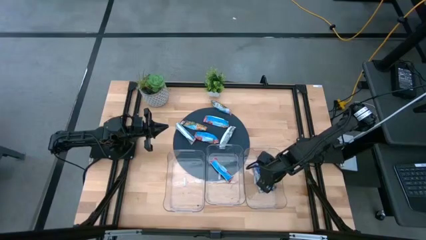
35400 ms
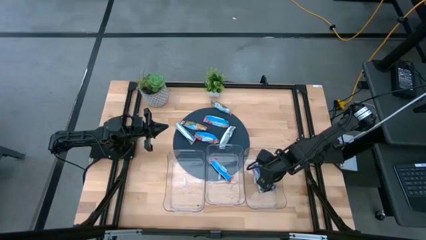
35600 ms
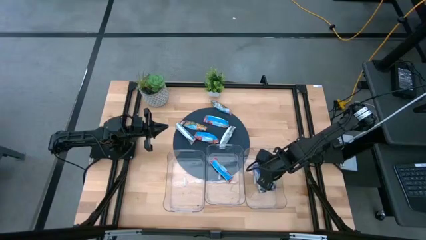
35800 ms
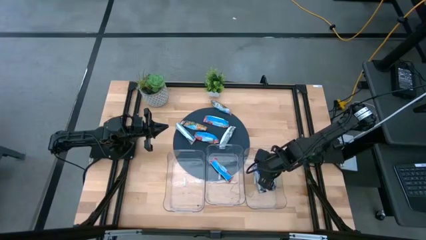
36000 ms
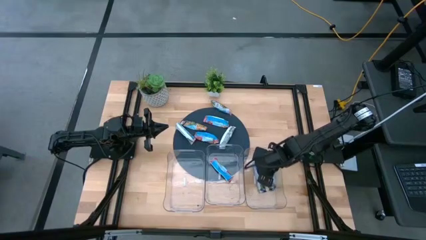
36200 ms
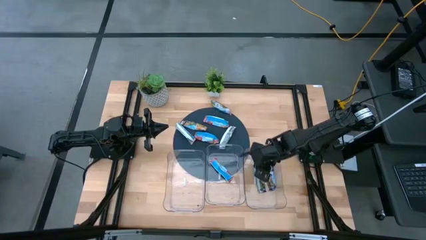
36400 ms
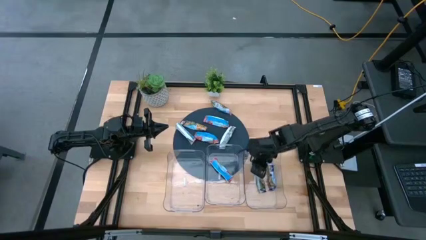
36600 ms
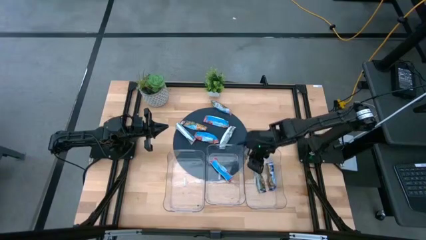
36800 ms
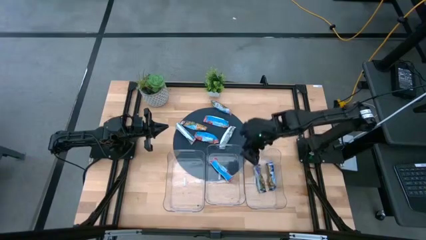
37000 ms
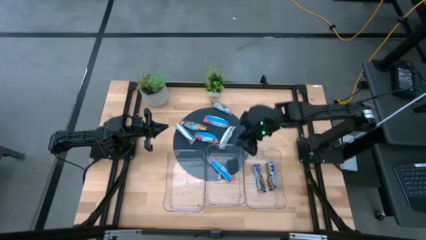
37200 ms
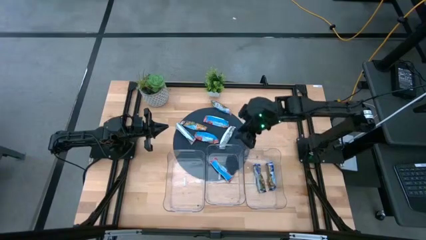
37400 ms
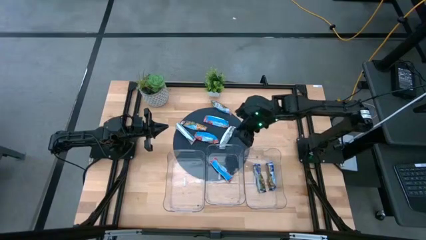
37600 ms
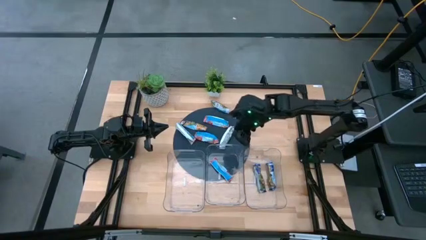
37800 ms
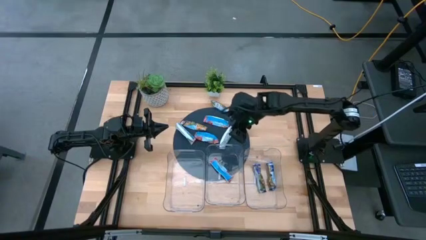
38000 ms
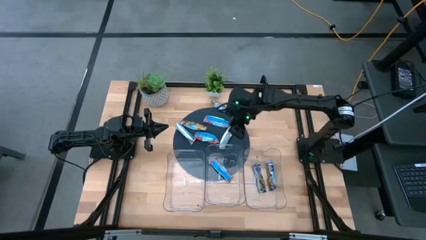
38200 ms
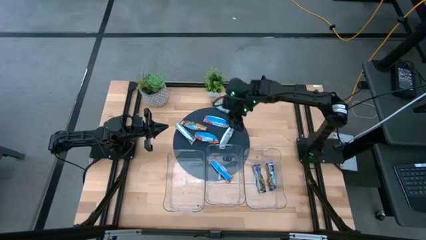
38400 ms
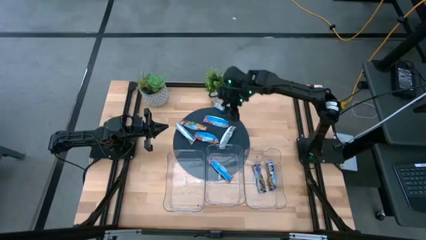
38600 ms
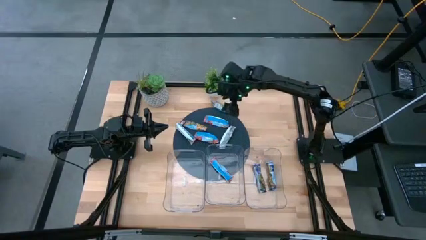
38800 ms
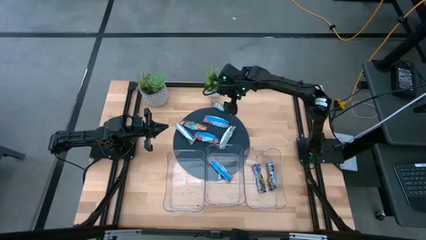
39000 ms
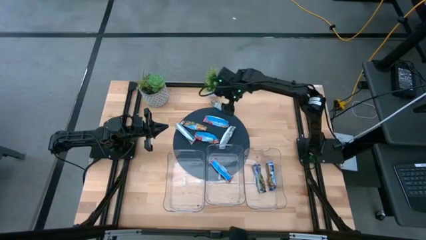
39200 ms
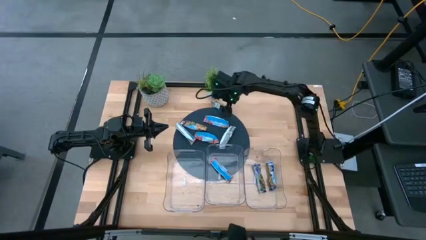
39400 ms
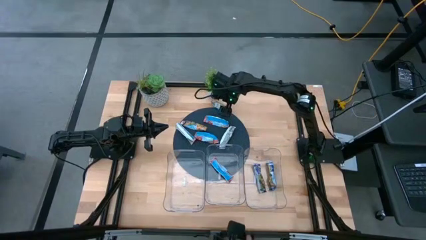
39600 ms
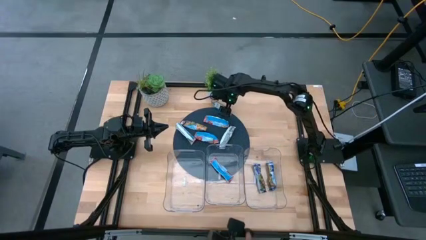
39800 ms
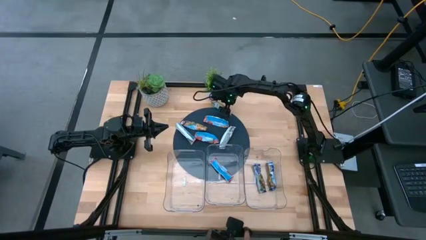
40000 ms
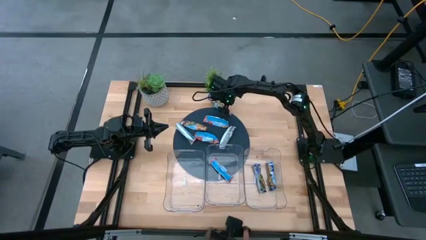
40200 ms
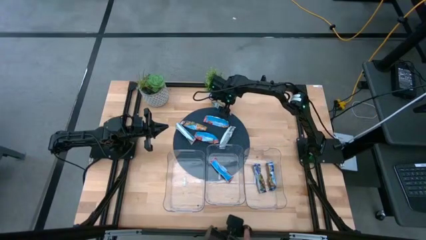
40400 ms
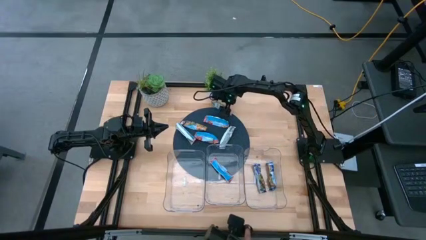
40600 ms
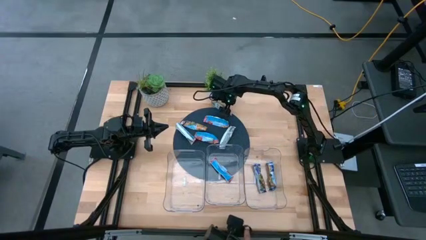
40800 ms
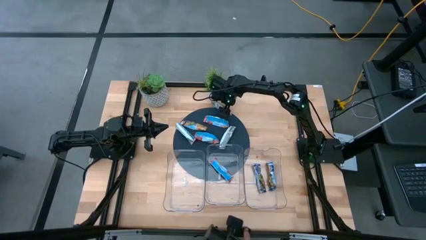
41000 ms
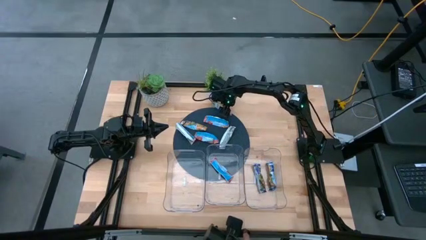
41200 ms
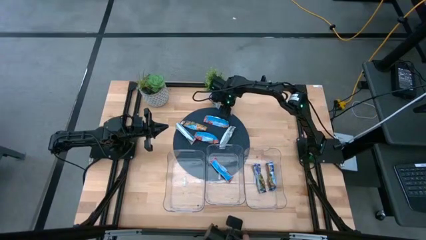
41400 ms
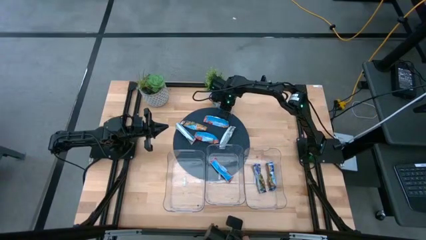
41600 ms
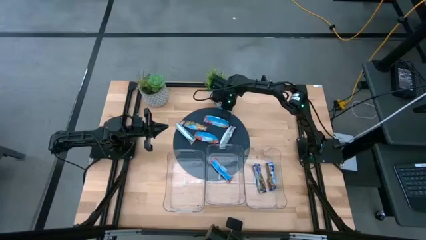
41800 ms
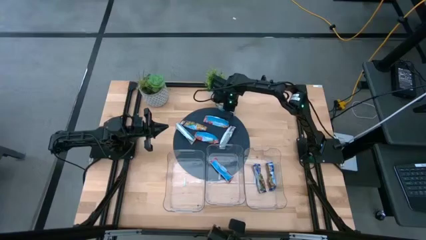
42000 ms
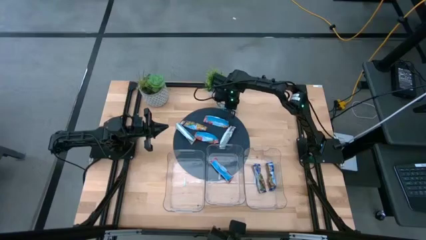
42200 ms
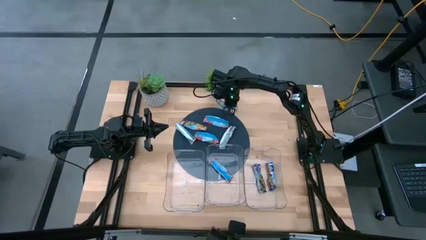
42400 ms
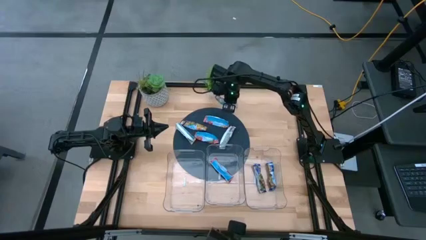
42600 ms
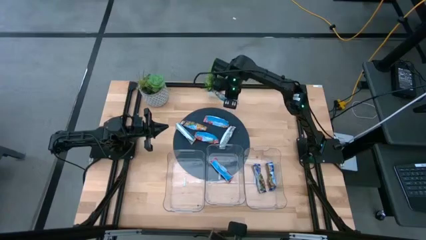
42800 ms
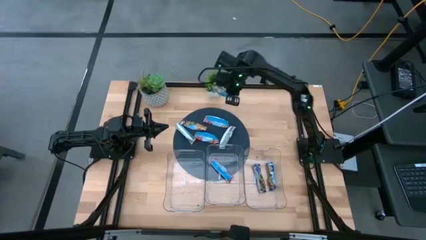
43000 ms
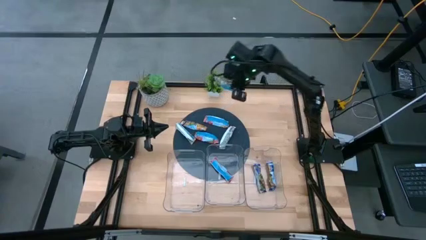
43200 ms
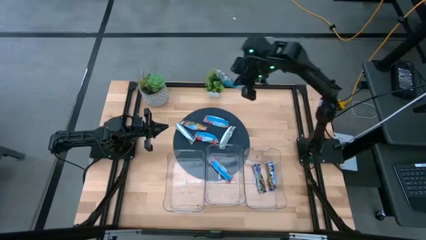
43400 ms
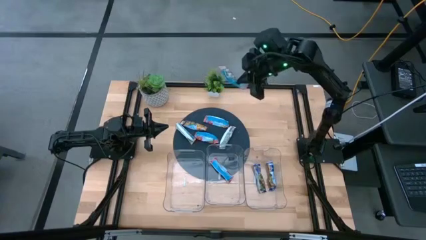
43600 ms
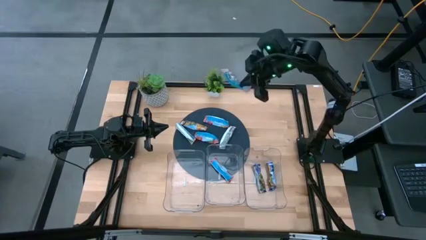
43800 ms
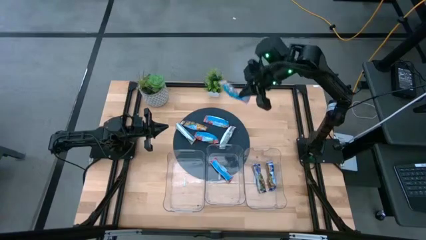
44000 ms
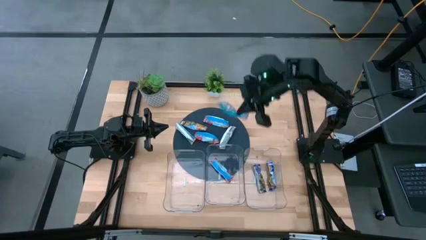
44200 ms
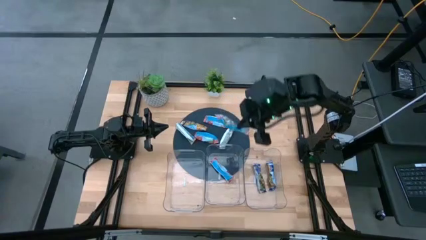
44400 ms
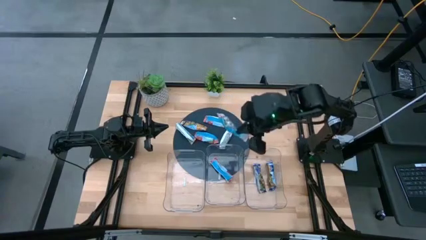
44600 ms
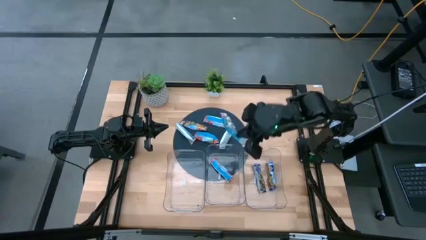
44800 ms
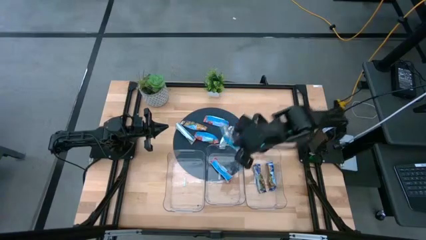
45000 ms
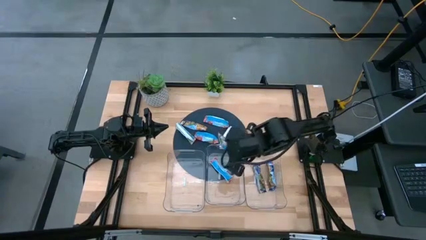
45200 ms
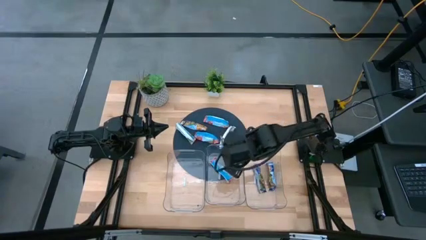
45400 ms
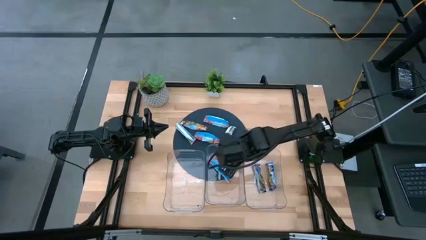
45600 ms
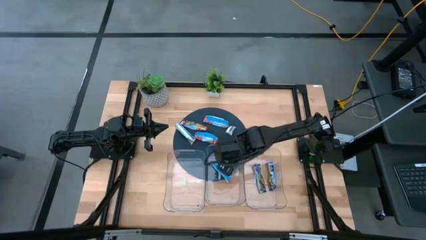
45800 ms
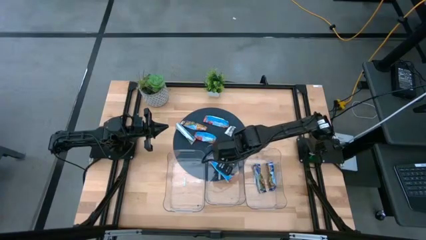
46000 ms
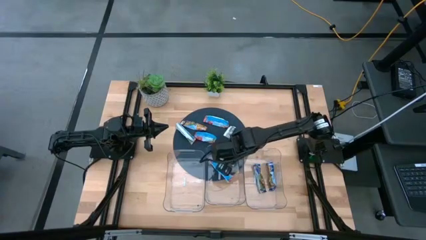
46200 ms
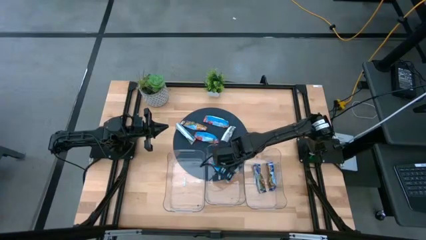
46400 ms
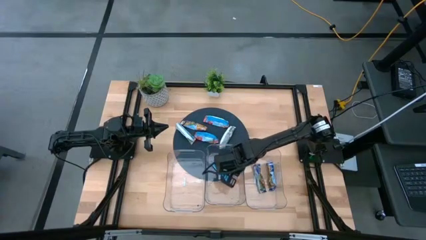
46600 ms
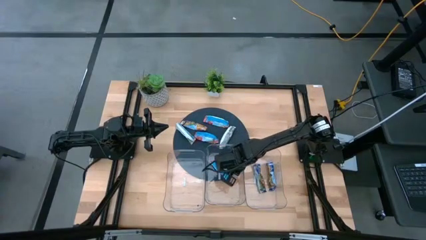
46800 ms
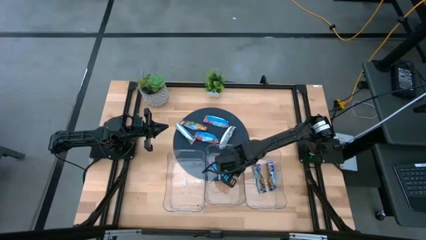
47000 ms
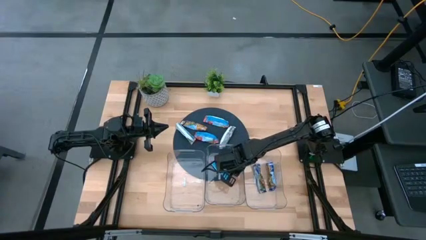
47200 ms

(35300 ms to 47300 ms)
Task: Pick and place Granola Bars by type
Put the red granola bar into the middle transparent bin

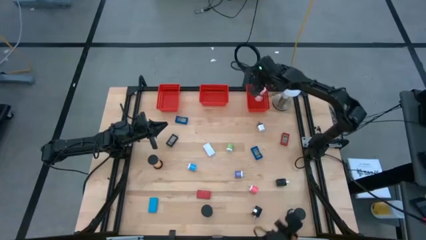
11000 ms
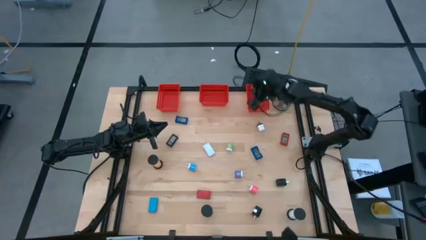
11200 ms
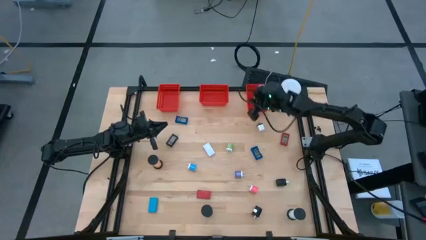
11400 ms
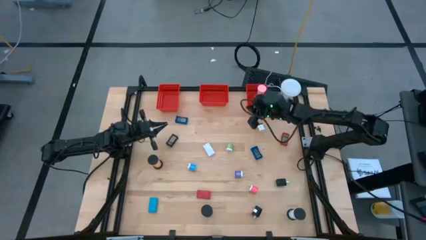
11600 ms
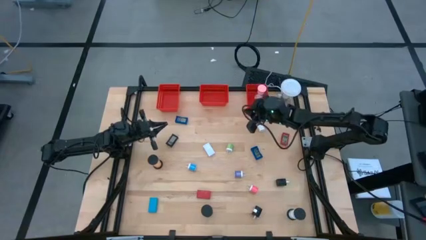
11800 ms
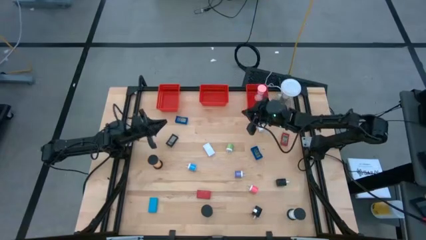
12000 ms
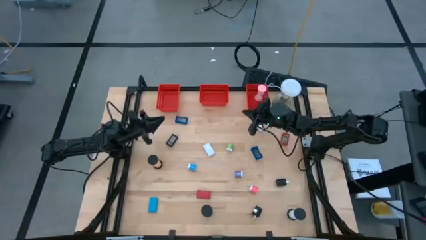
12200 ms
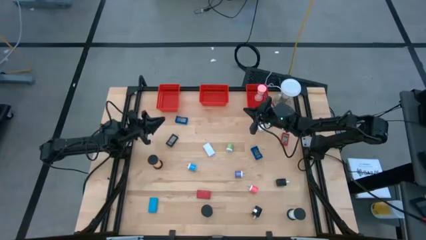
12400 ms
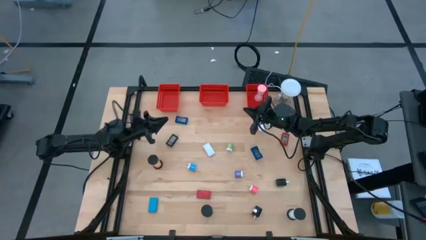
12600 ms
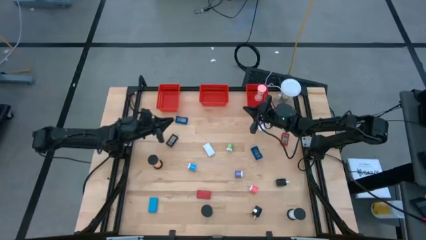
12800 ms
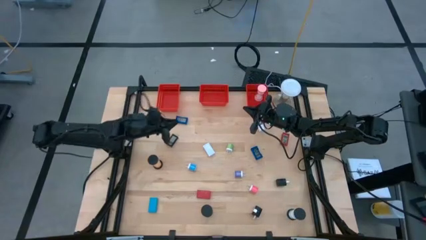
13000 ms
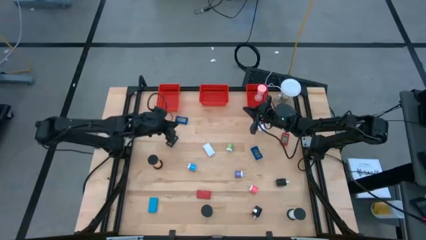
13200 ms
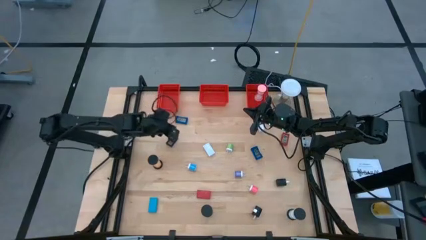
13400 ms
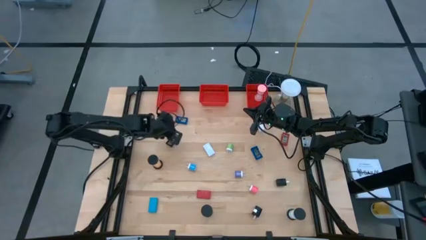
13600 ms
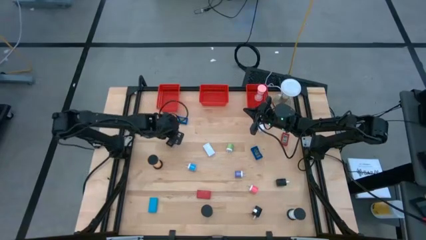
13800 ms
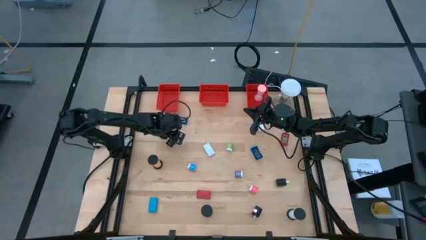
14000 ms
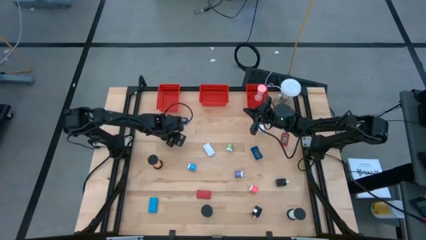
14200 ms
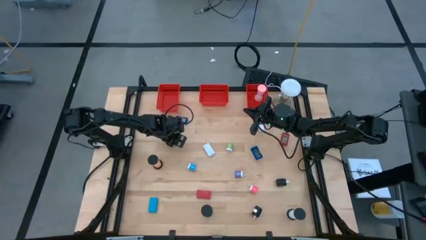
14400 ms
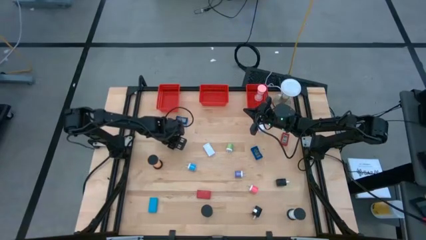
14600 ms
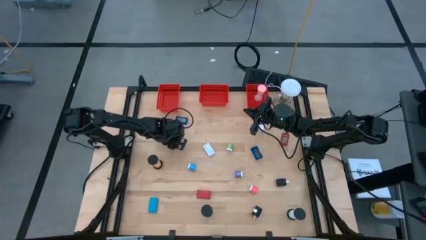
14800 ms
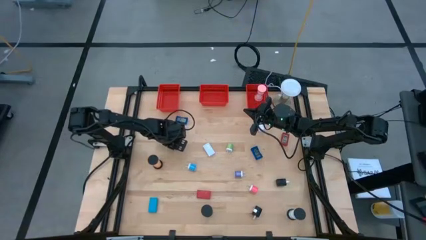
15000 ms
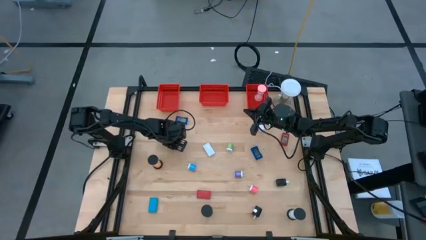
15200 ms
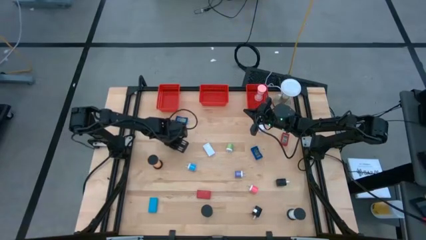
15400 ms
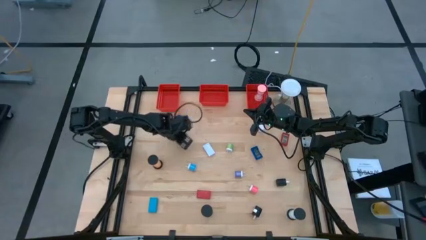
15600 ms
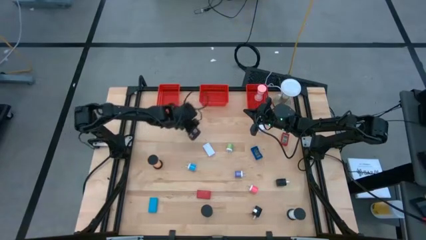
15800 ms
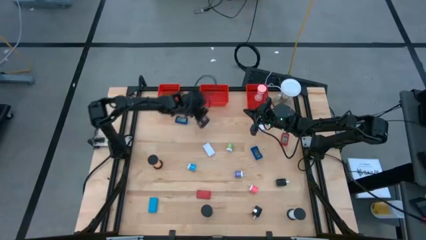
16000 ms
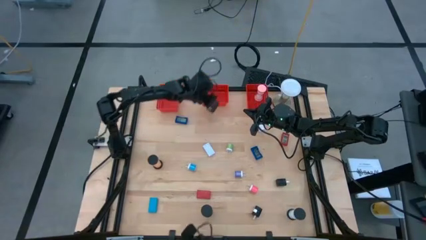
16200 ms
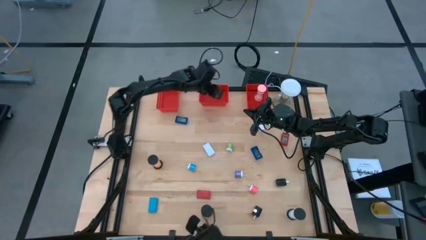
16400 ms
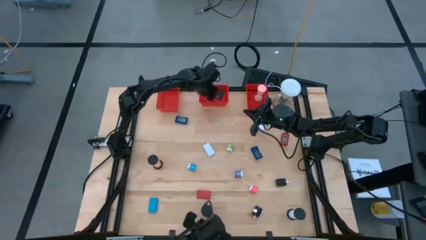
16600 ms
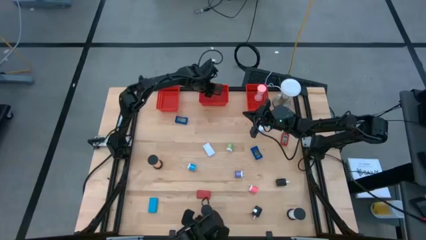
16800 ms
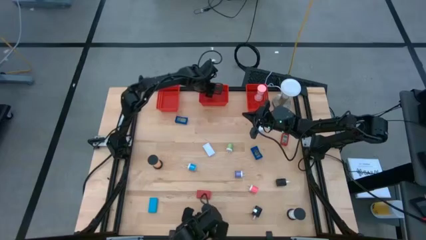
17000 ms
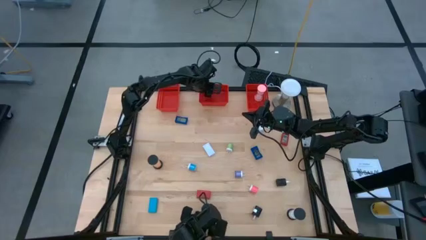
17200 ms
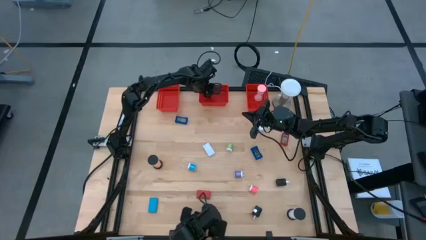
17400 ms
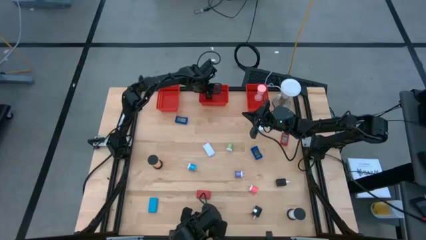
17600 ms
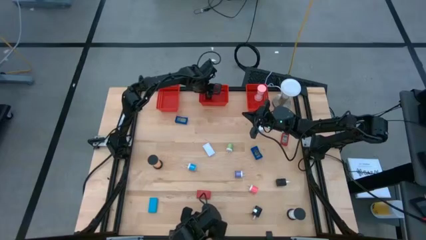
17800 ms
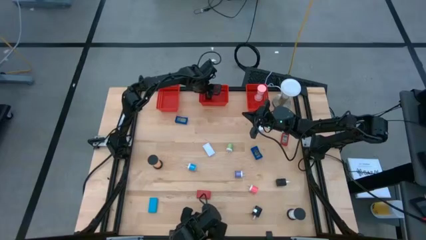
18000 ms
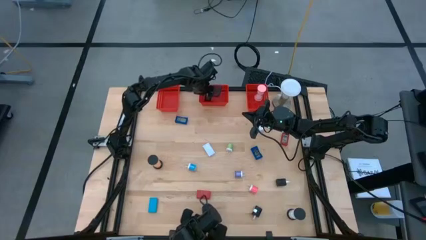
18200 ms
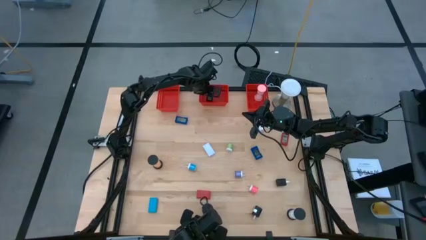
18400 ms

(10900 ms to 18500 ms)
Task: Pick & Place Office items
Put the black digital clock into the middle red bin
